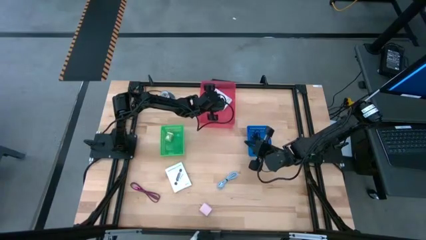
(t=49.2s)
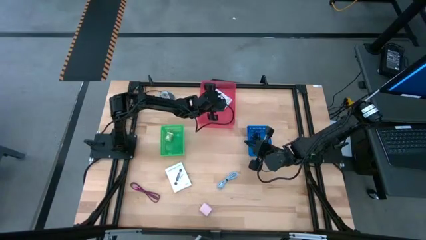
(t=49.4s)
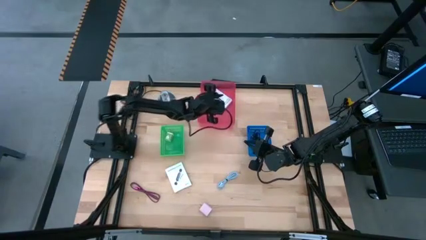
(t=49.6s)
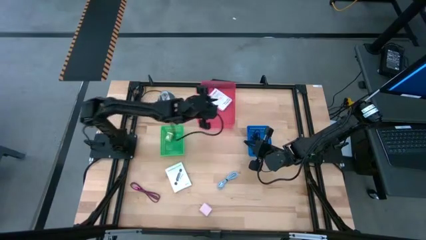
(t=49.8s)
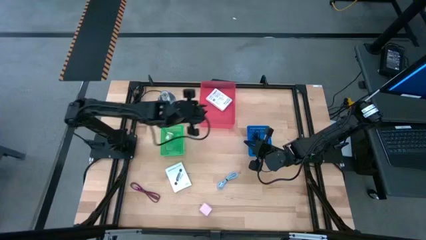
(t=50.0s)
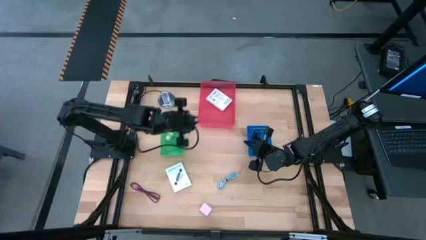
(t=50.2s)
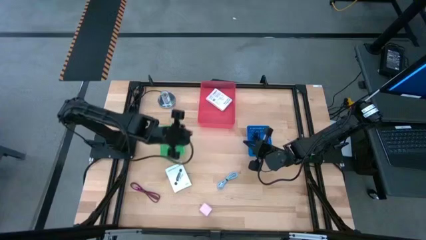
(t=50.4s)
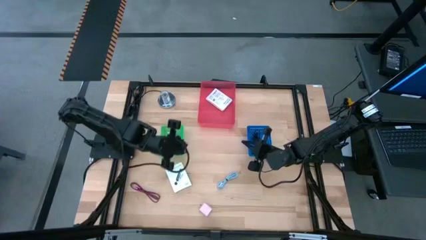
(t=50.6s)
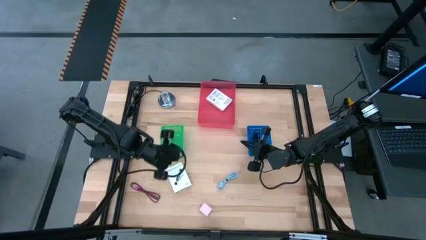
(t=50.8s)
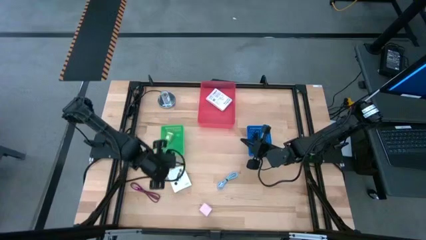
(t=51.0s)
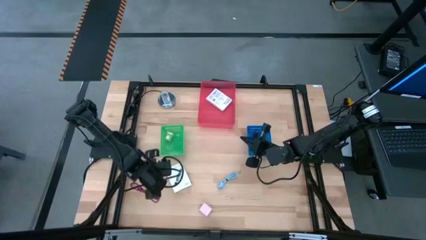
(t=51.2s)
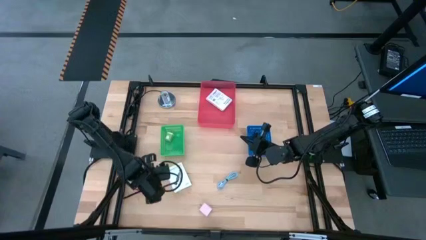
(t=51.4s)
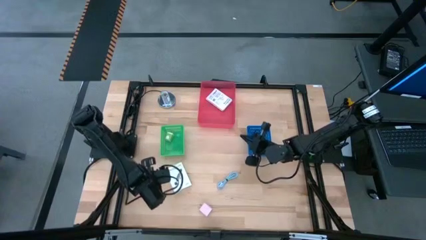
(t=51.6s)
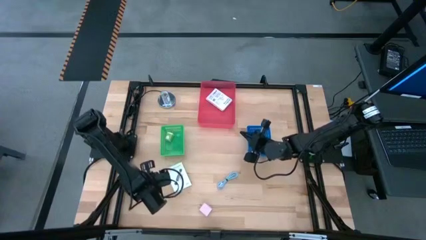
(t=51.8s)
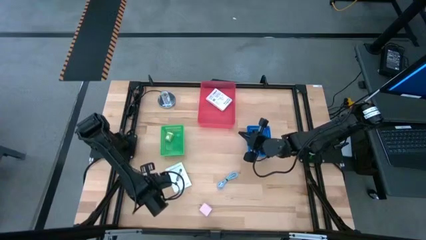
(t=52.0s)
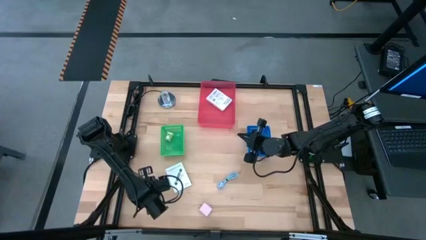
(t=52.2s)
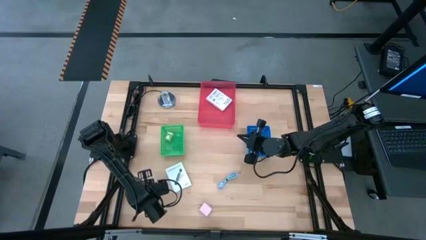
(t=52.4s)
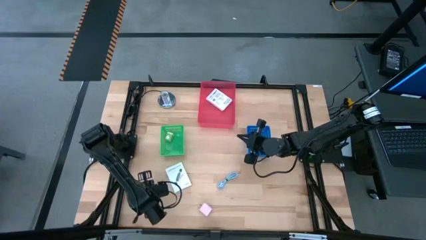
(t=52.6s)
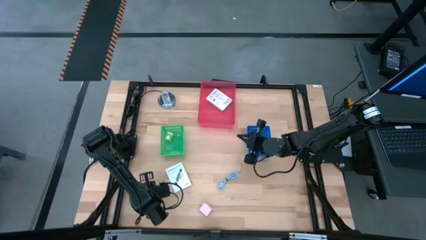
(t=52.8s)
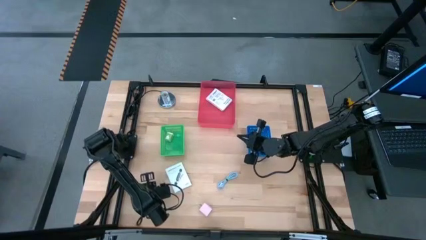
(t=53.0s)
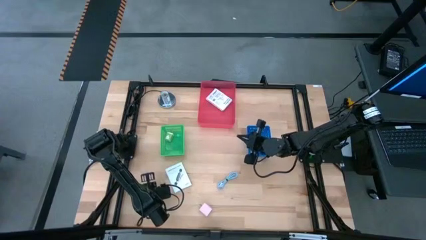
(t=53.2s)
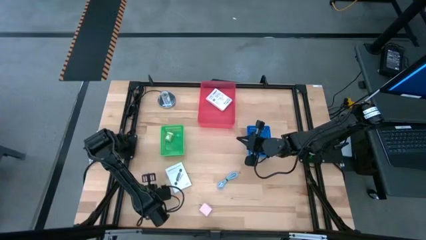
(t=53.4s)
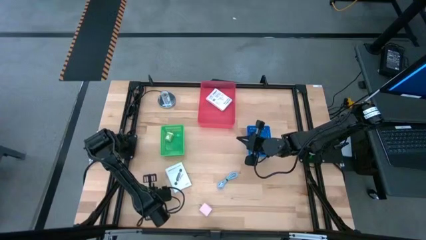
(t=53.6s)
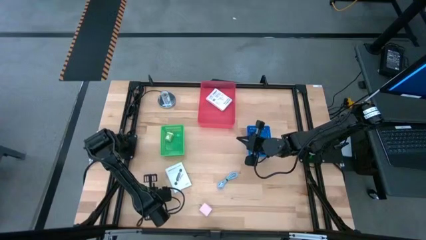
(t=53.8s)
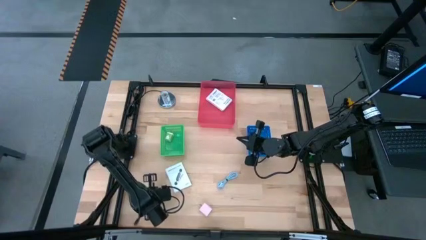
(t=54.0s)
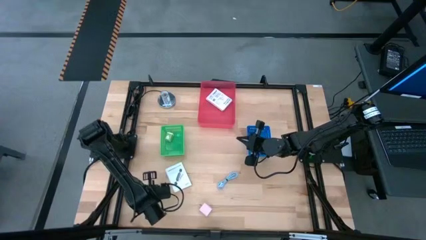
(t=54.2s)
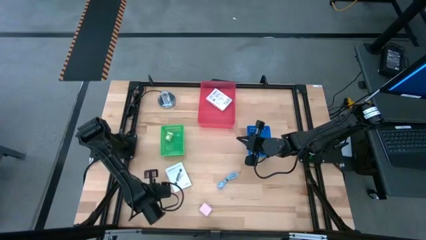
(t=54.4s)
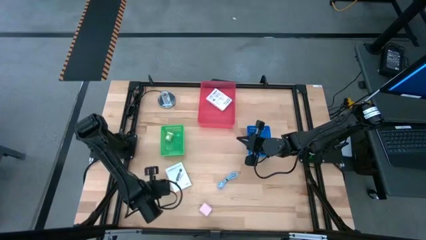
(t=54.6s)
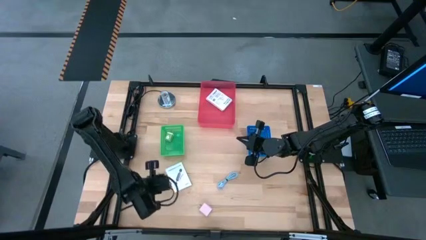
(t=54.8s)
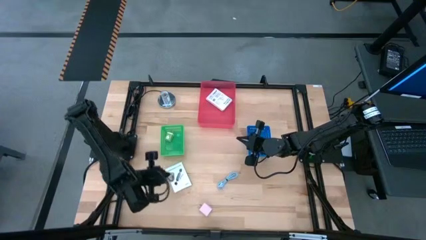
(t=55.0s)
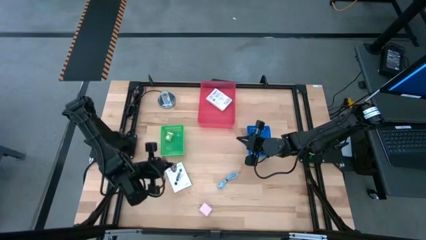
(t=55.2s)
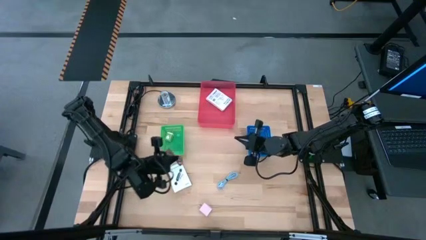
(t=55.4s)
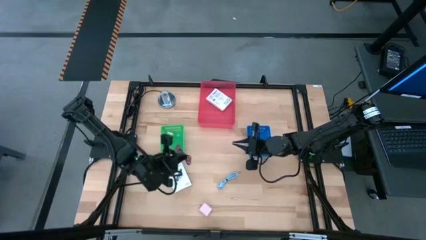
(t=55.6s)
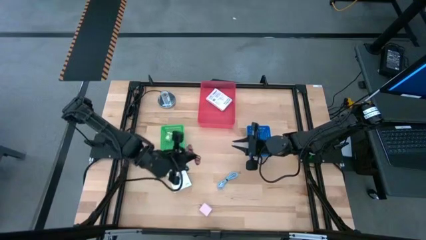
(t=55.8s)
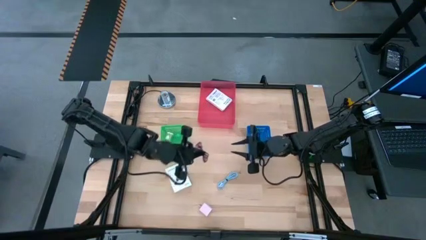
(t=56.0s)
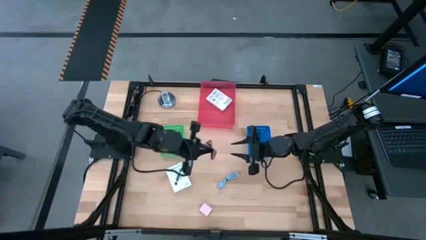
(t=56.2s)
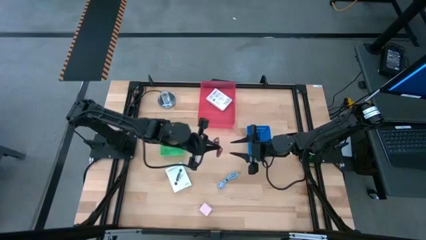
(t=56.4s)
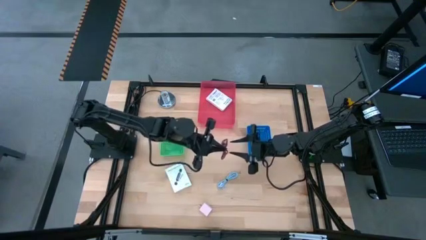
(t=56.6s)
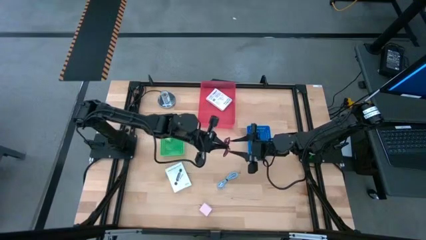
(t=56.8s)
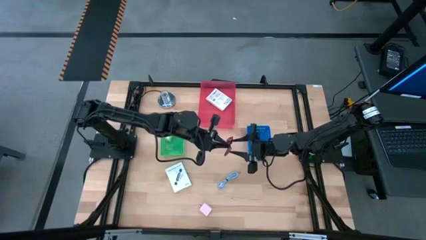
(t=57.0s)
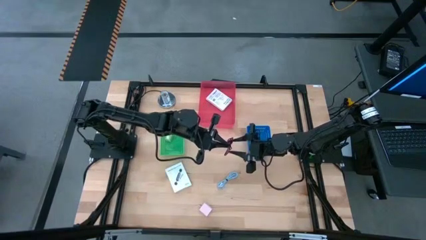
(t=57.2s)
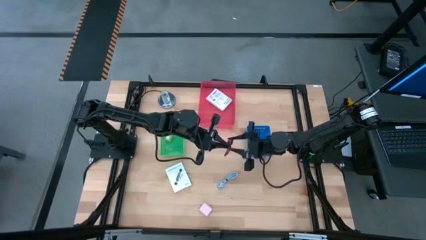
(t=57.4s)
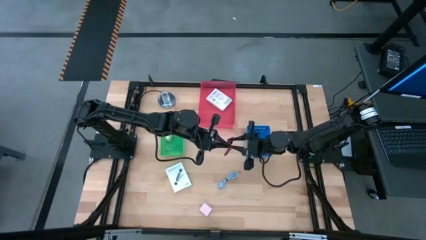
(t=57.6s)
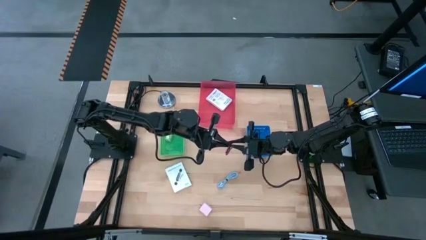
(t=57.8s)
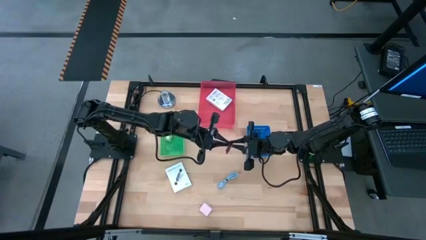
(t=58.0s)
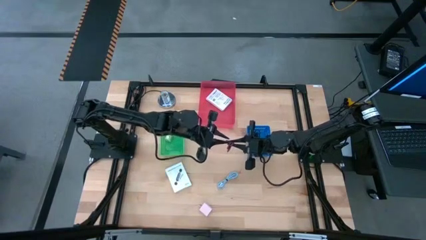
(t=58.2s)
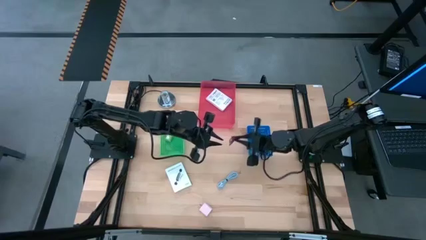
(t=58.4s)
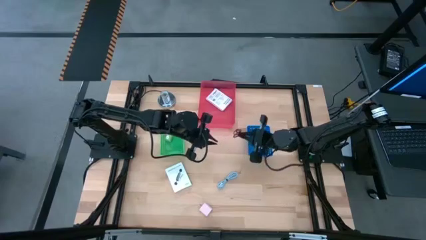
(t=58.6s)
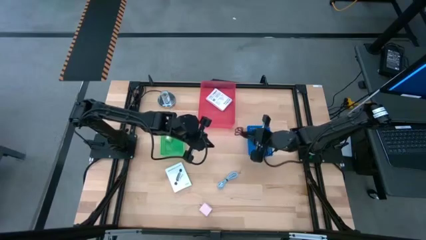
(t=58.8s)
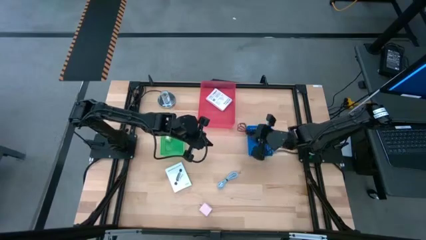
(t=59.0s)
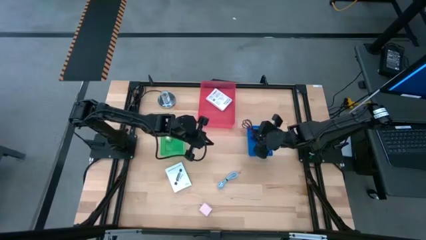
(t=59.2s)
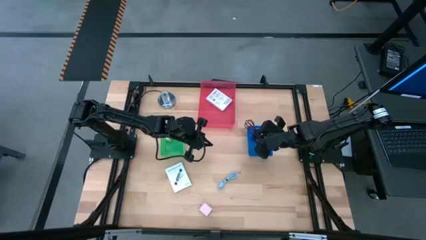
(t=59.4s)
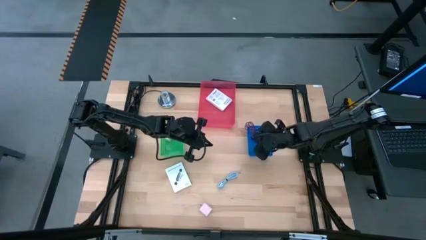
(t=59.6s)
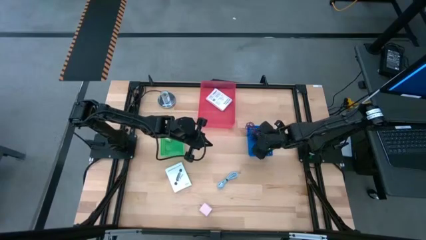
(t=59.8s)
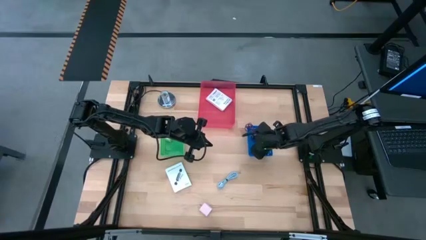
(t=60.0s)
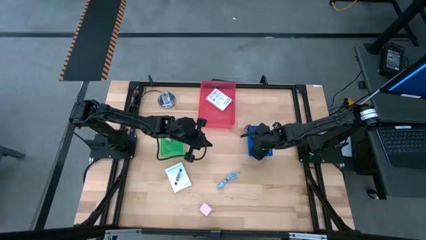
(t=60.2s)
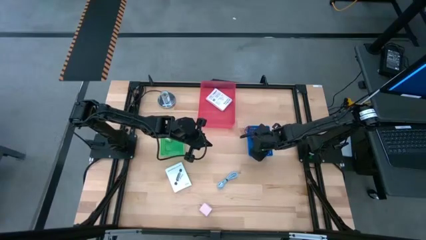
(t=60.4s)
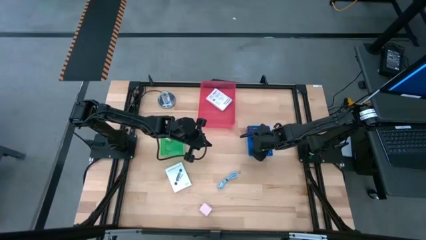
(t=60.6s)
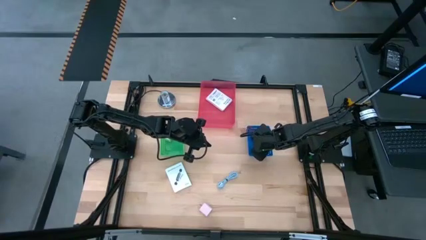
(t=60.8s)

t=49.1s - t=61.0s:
Task: Pick and place items into bin
Put the pink charger cable into the blue basket

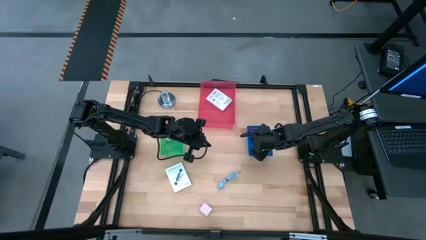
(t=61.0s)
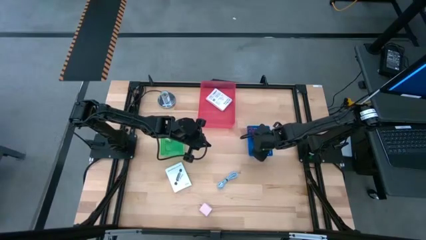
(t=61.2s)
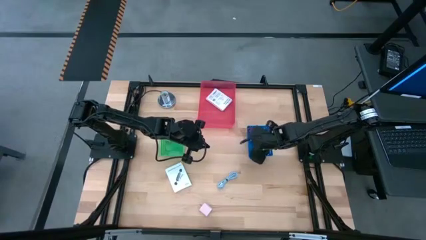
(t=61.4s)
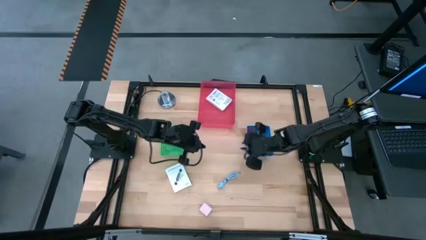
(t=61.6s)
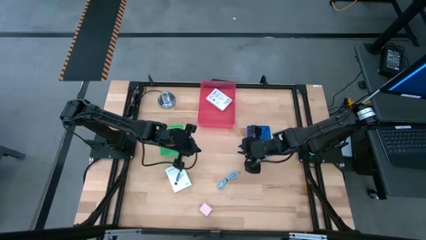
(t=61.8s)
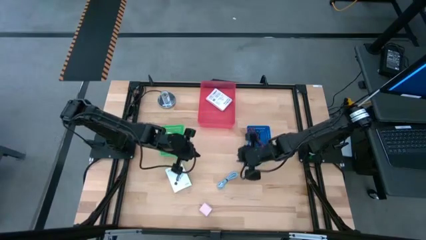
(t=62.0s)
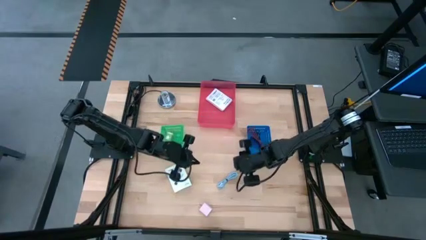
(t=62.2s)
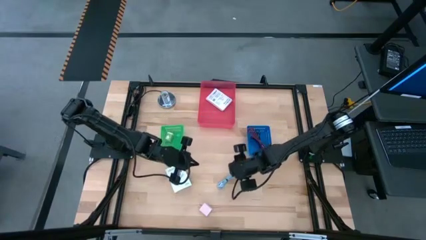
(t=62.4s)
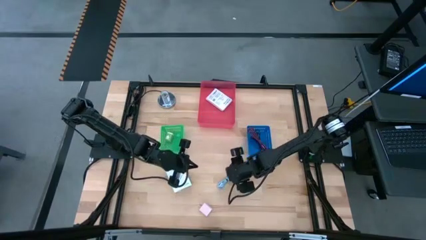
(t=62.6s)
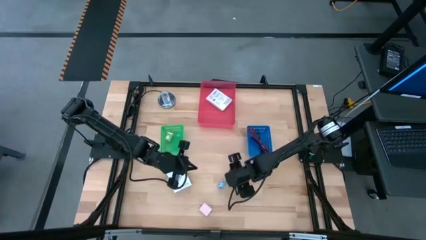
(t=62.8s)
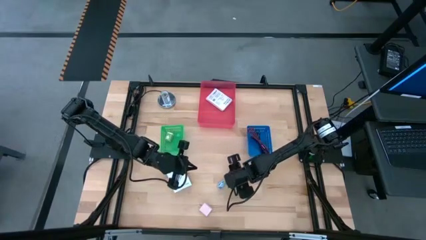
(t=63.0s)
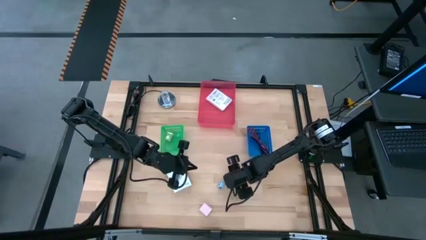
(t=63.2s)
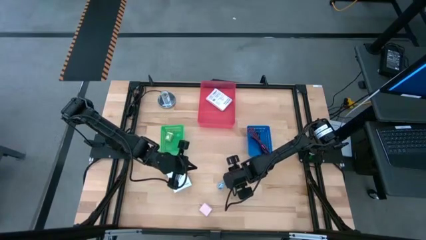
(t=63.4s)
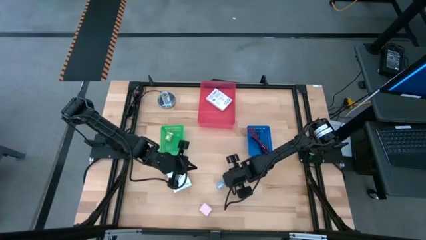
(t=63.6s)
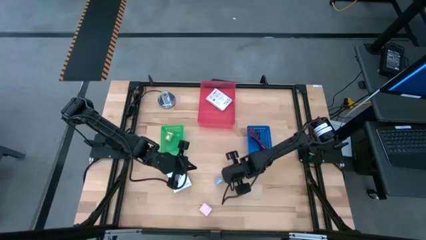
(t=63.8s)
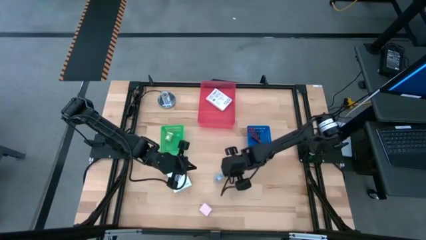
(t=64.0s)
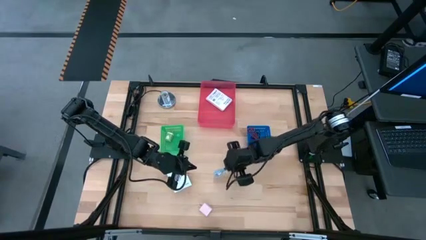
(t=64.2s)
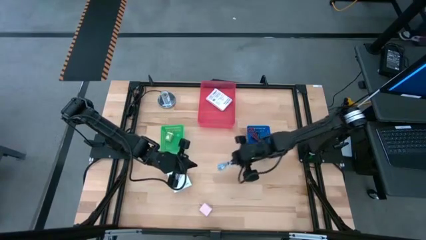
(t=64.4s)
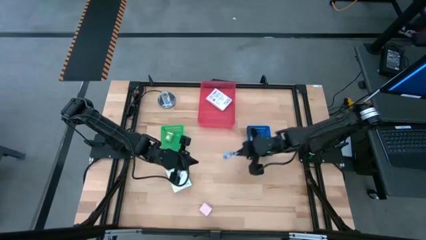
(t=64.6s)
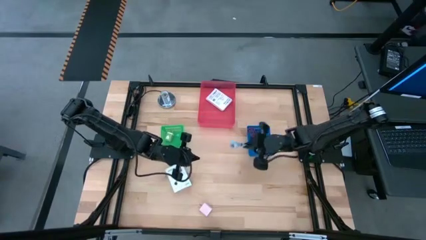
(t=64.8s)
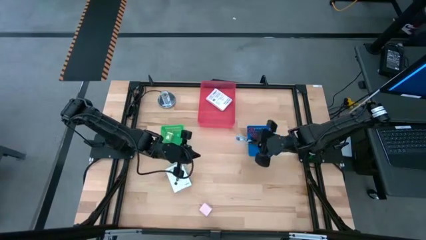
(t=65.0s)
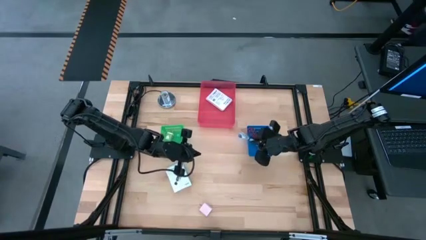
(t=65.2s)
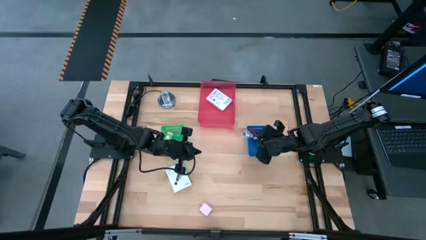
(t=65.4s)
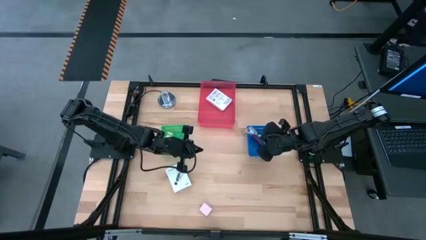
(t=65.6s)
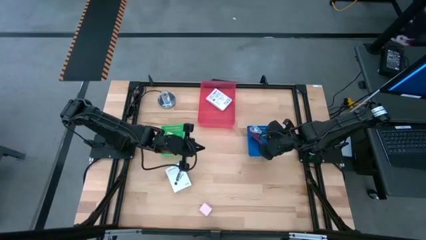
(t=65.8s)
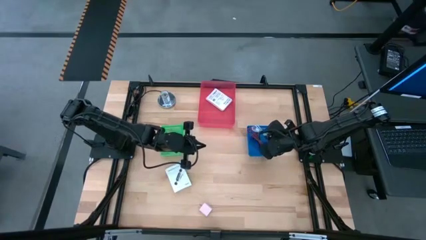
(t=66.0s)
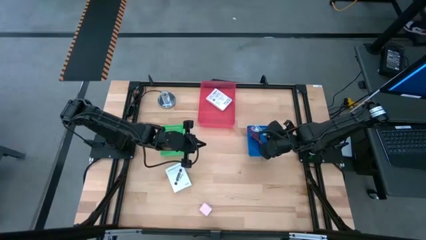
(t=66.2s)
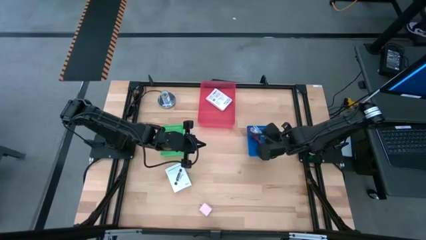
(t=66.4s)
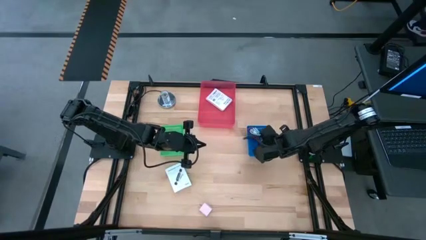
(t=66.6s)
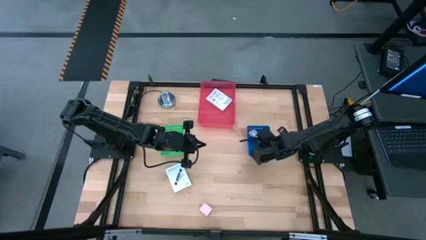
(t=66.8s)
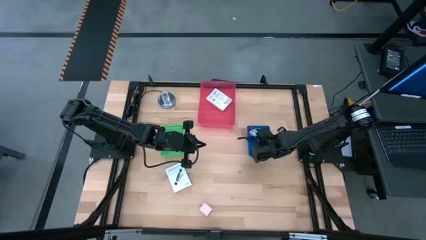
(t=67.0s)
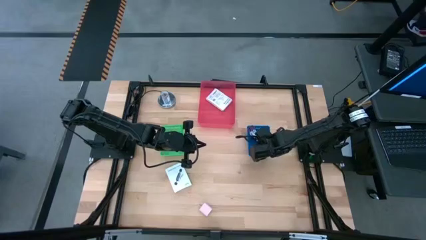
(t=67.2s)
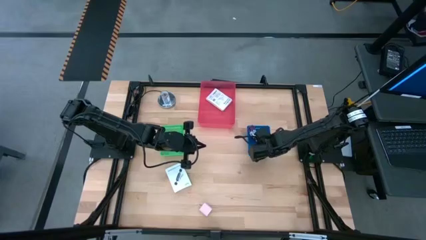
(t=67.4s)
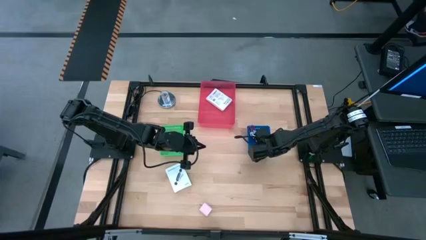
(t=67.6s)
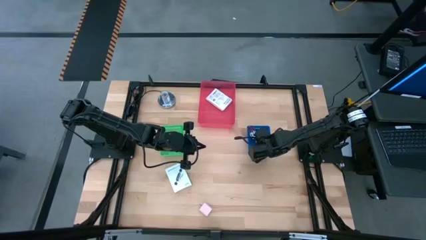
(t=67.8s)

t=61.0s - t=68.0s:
Put the light blue charger cable into the blue basket
